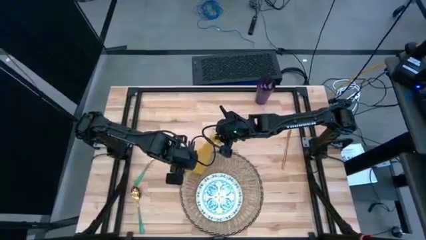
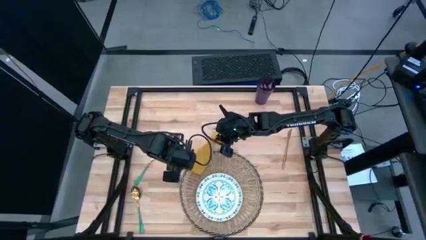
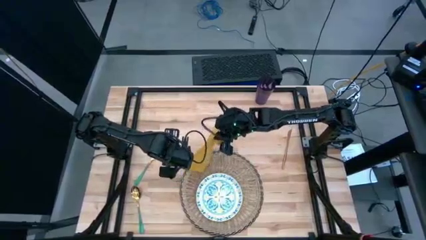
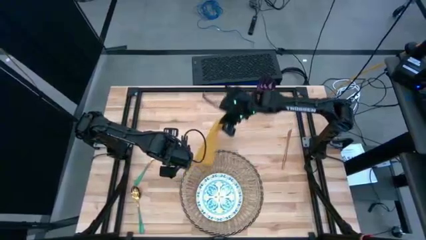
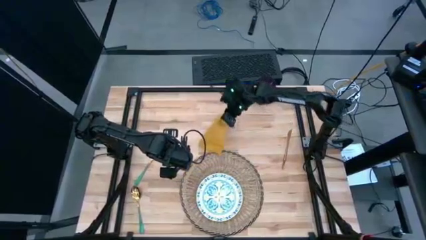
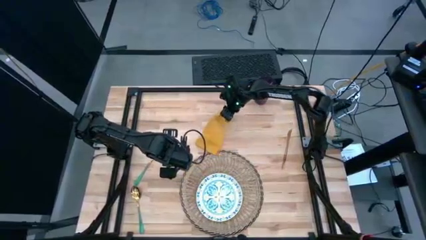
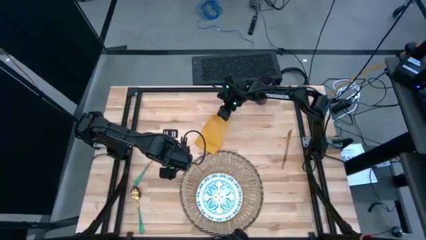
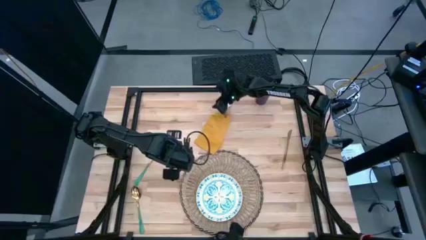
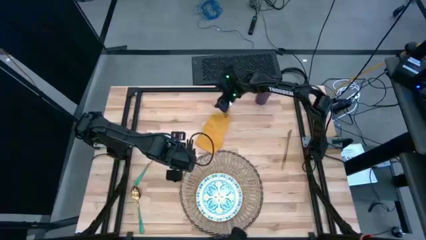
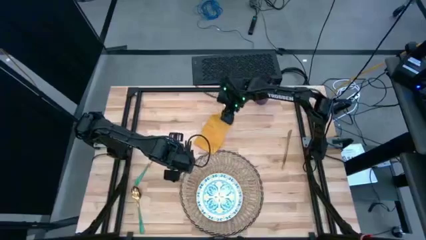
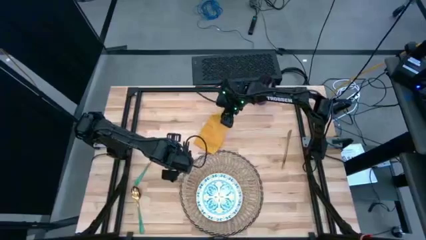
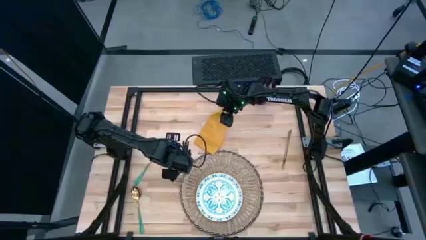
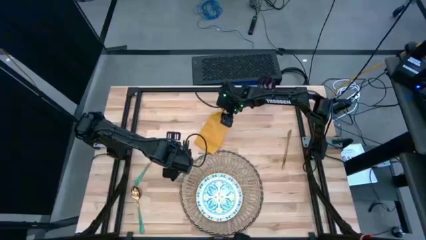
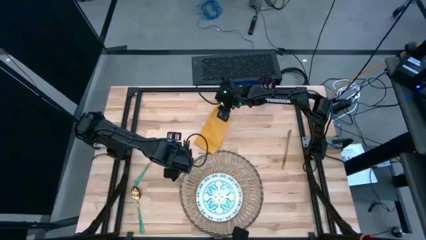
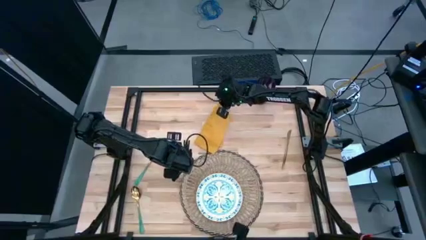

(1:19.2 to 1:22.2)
Task: Set table place
Fold the yellow napkin

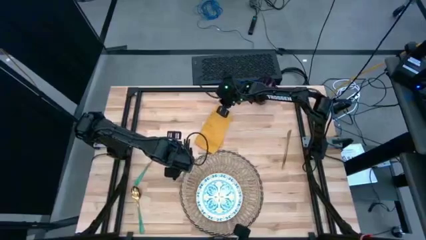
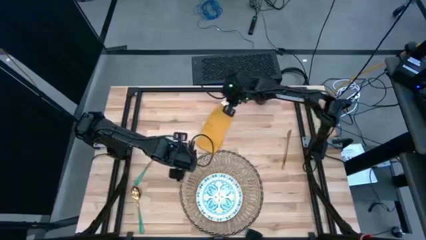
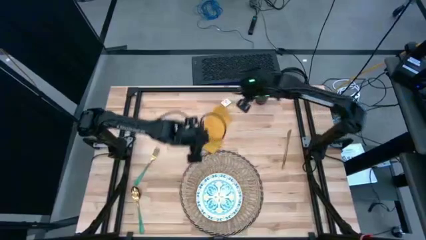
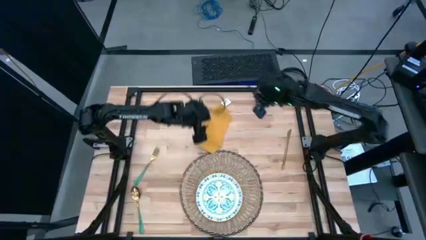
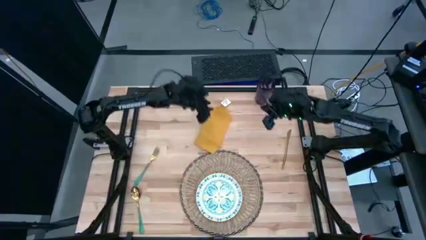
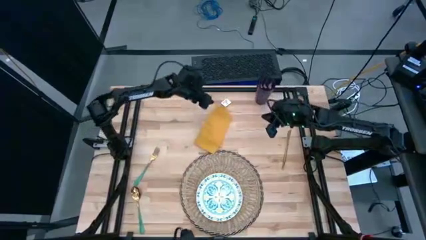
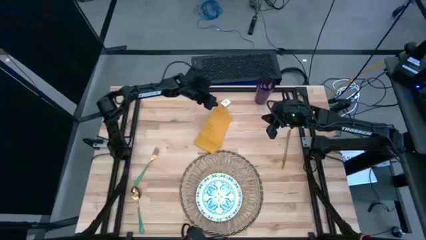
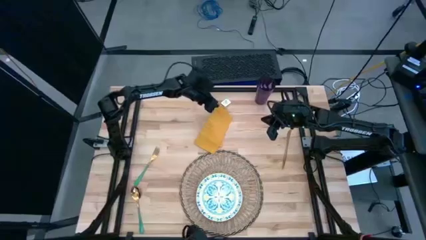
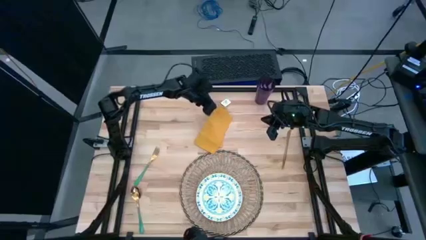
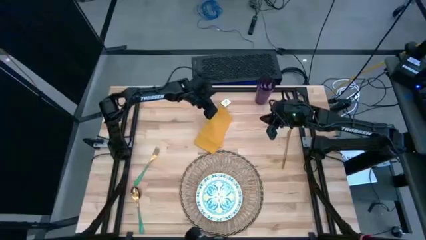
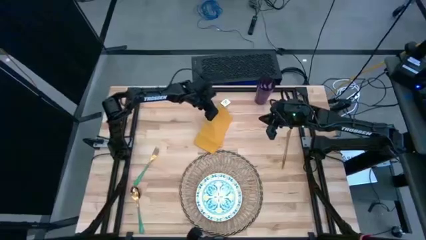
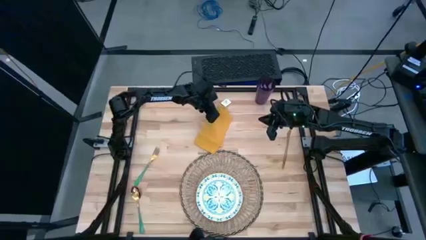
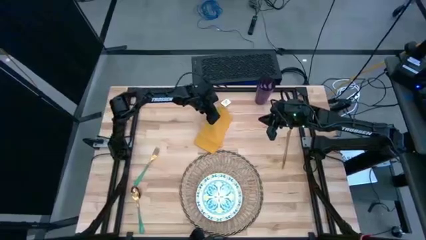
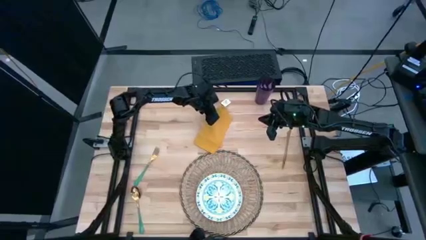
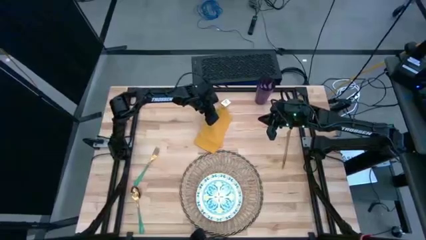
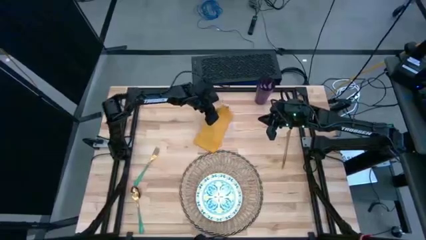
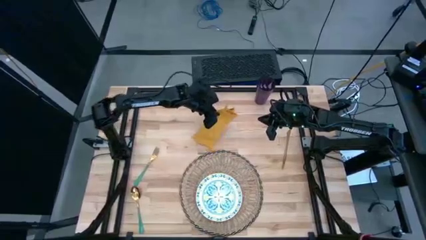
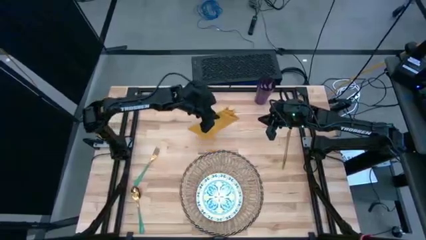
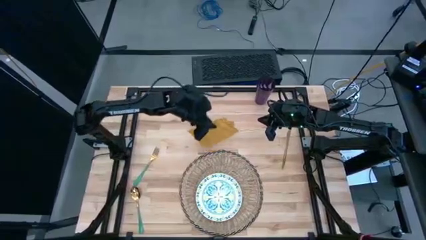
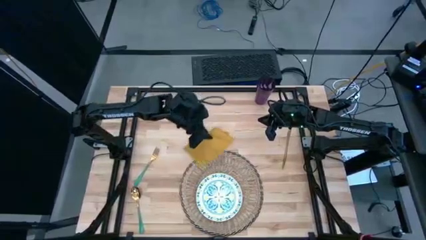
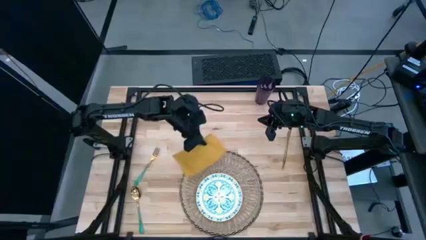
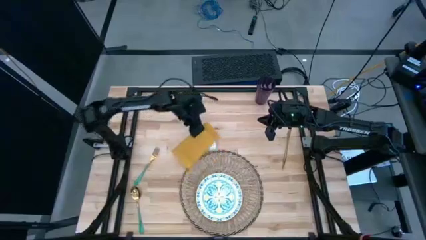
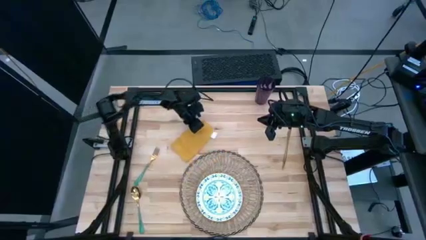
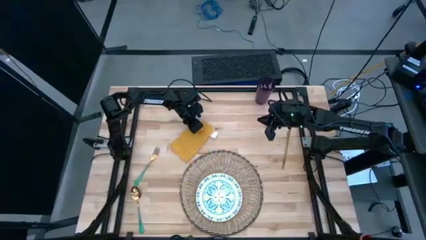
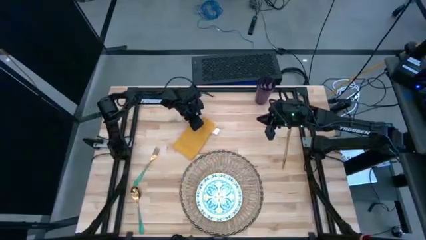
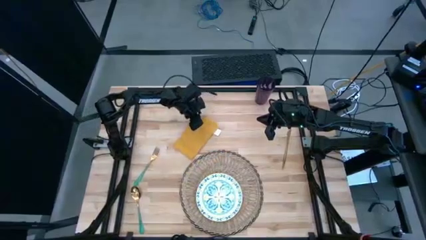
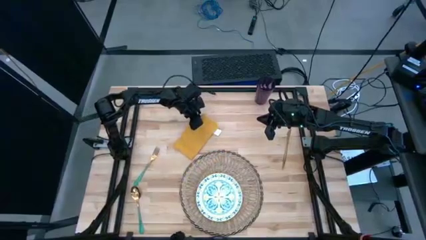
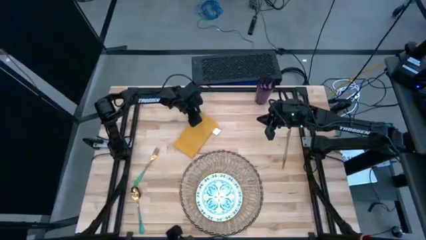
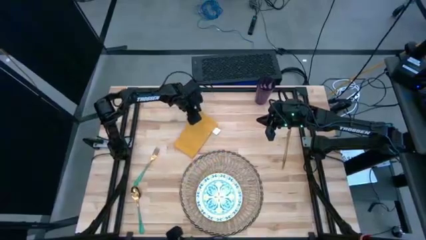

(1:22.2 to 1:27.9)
Fold the yellow napkin

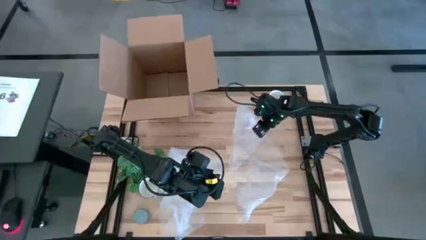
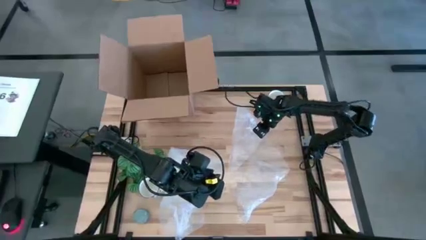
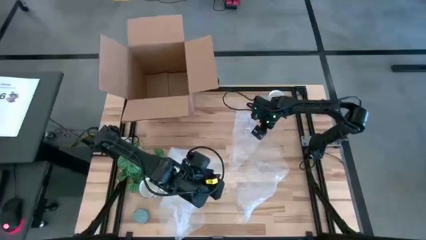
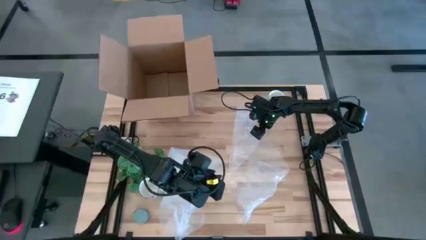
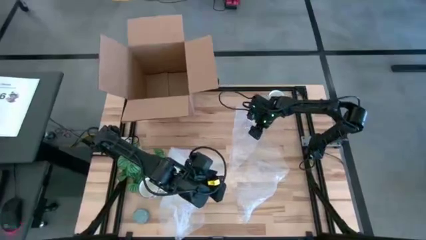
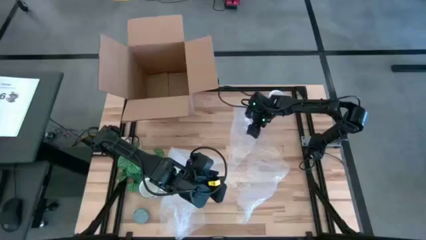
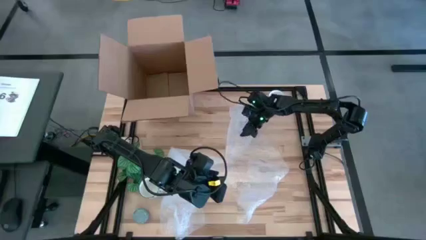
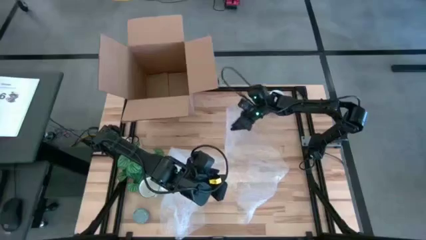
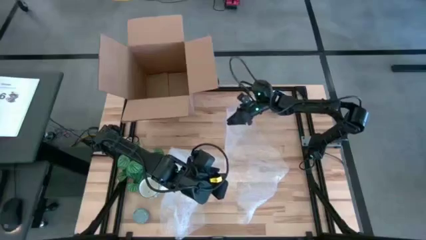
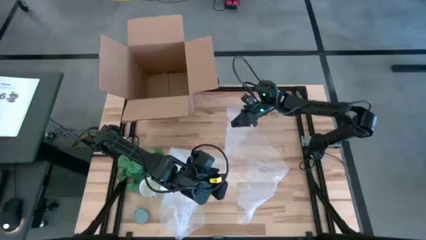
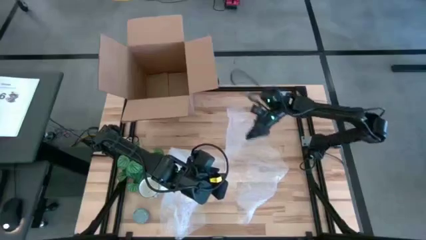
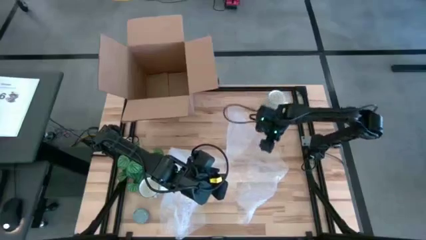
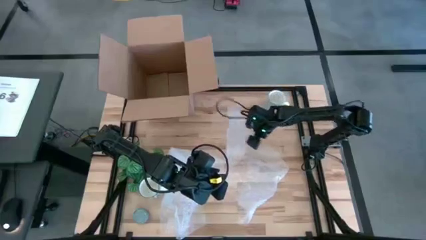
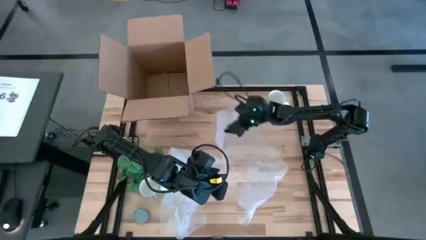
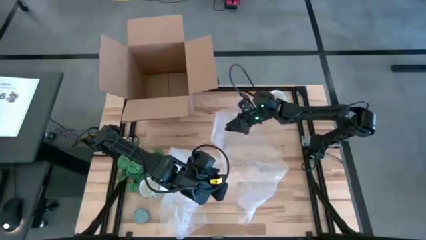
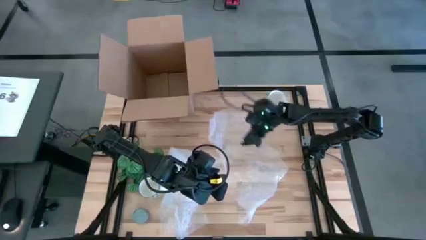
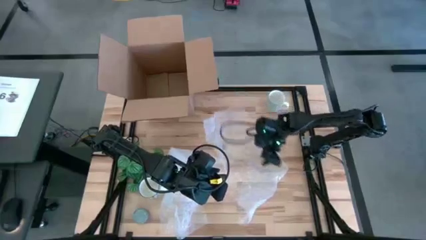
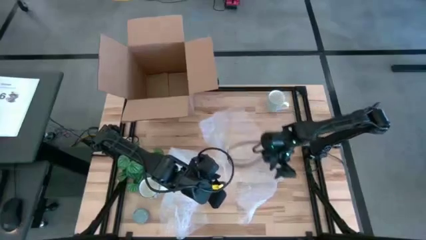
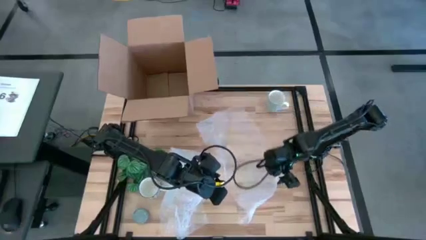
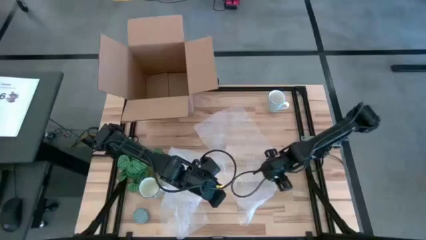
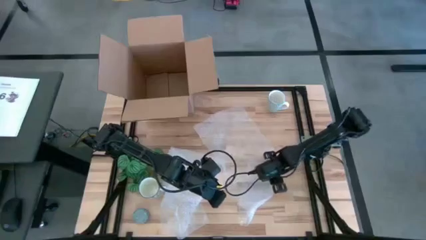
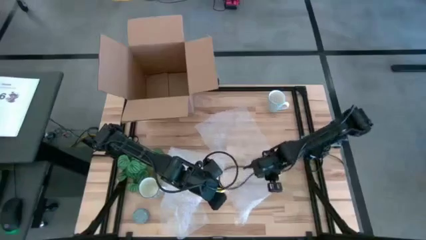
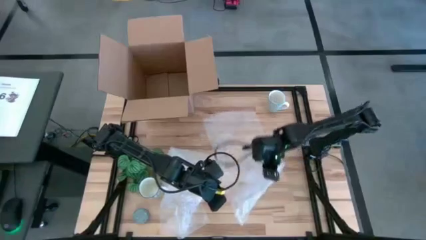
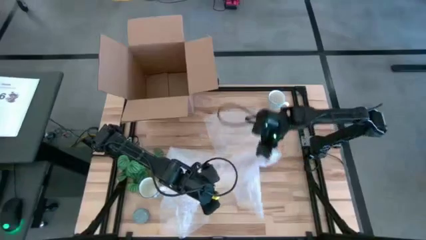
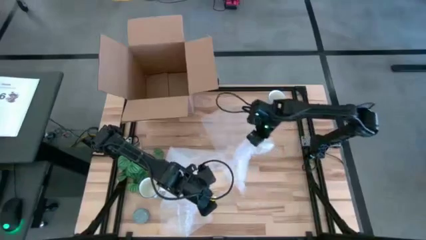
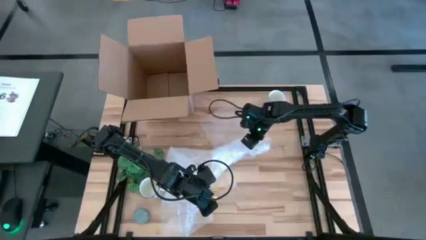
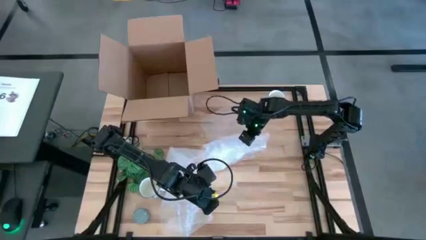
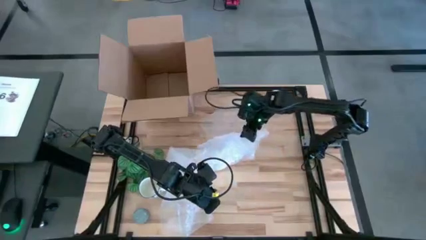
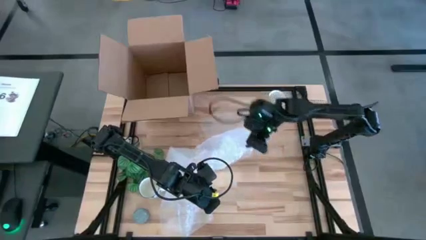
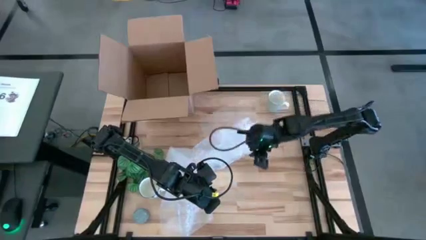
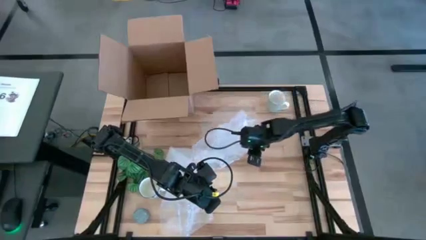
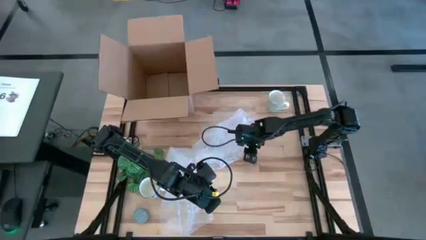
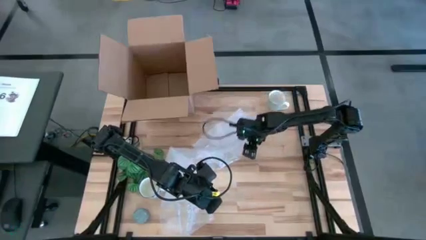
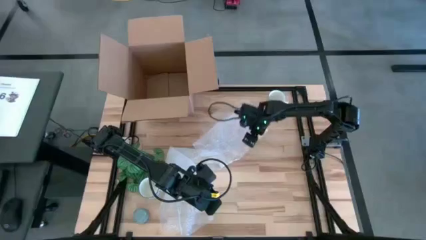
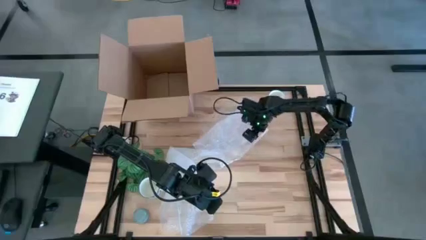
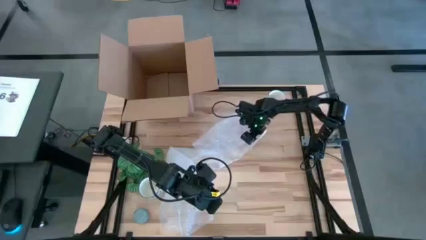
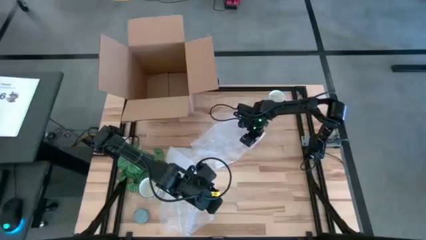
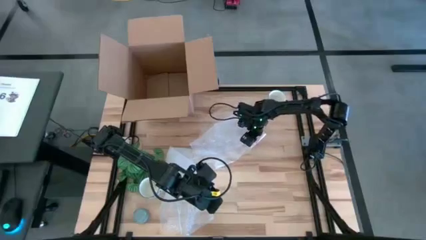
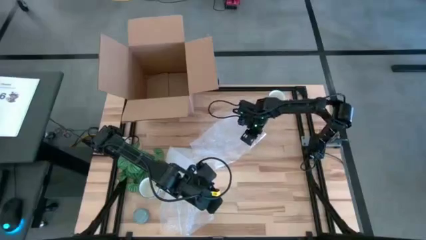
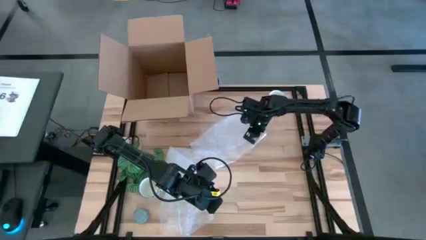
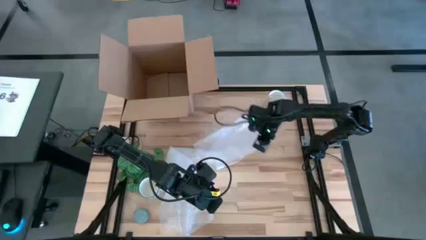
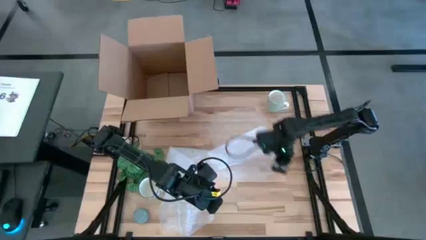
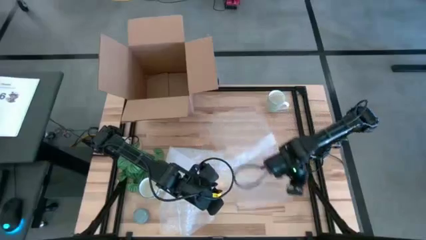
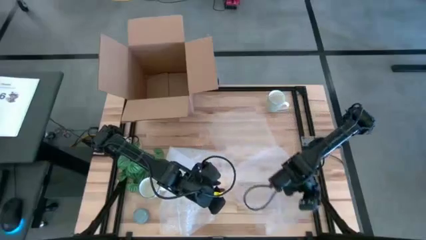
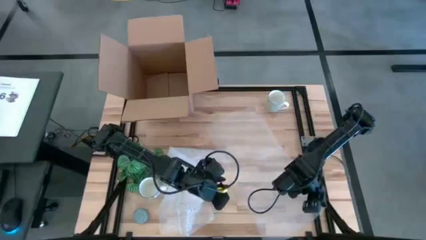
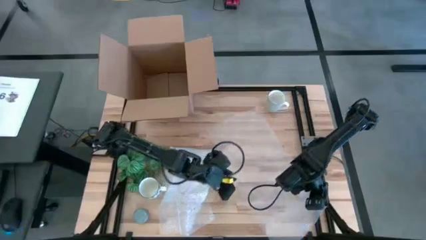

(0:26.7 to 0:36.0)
Task: wrap mug
Prepare the bubble wrap
